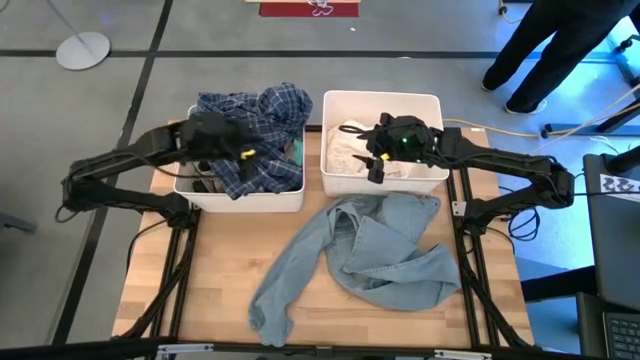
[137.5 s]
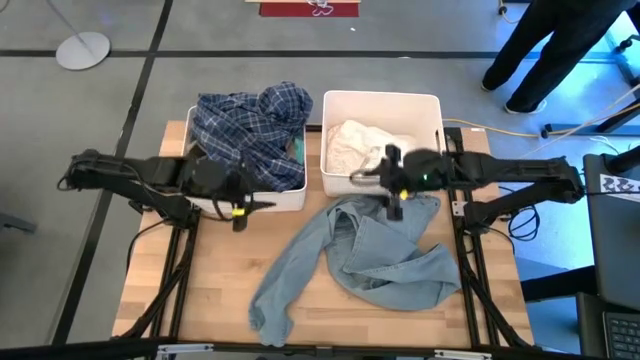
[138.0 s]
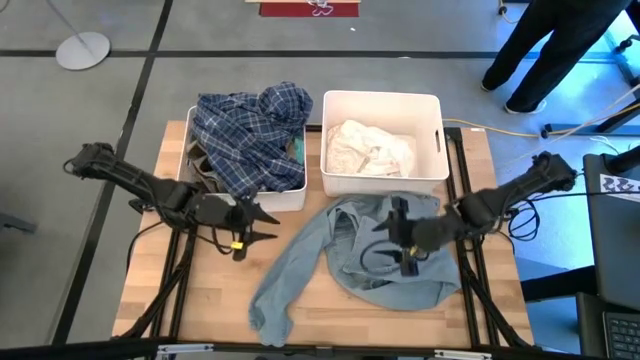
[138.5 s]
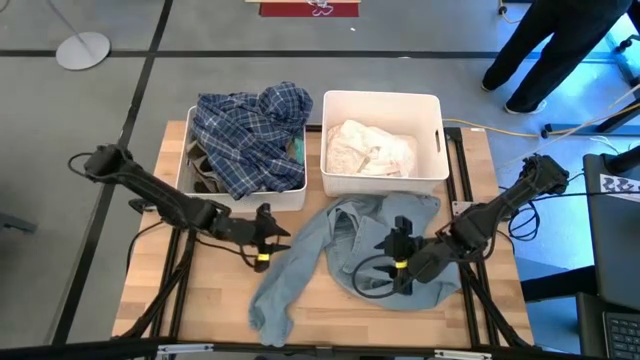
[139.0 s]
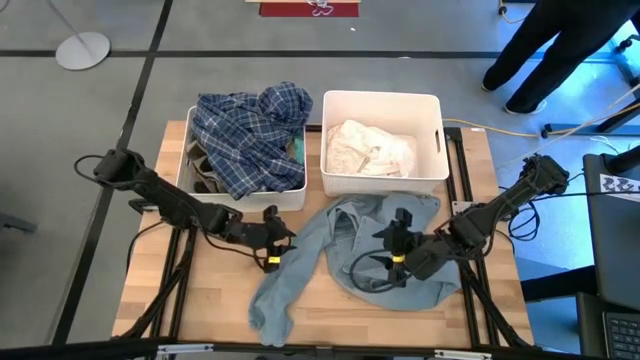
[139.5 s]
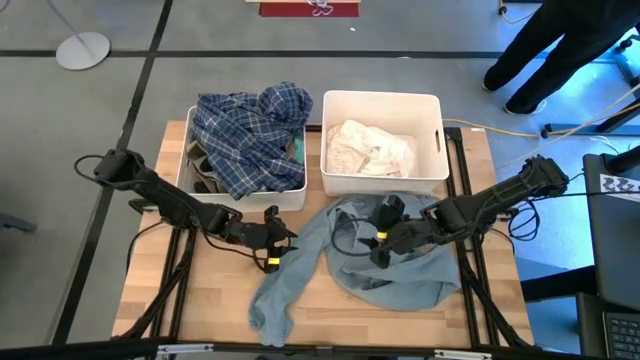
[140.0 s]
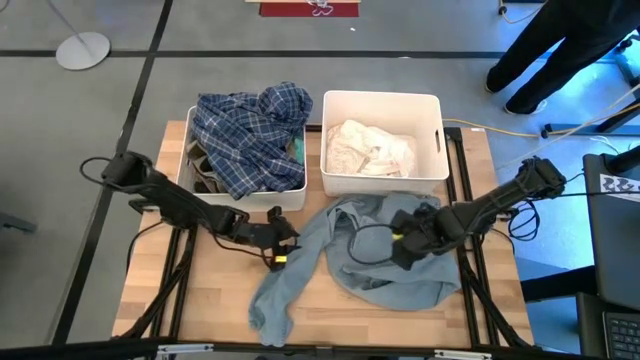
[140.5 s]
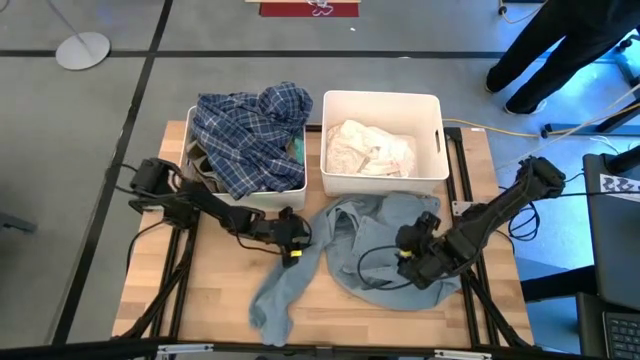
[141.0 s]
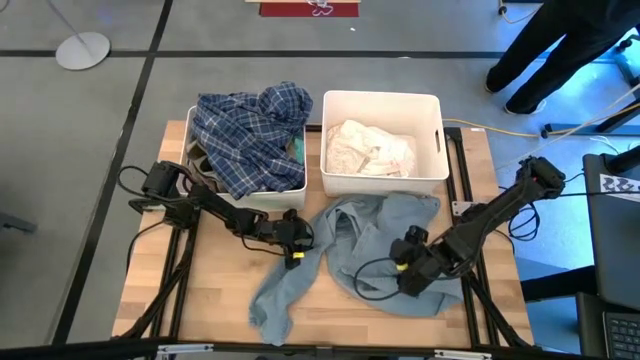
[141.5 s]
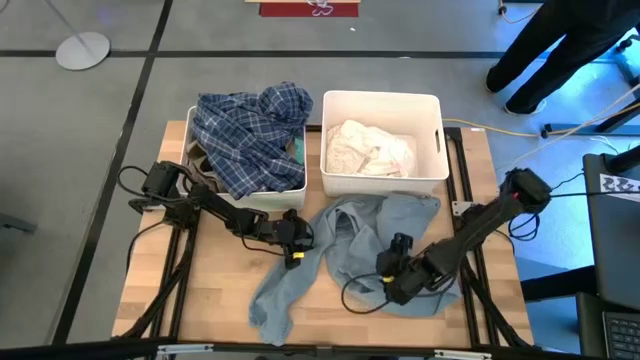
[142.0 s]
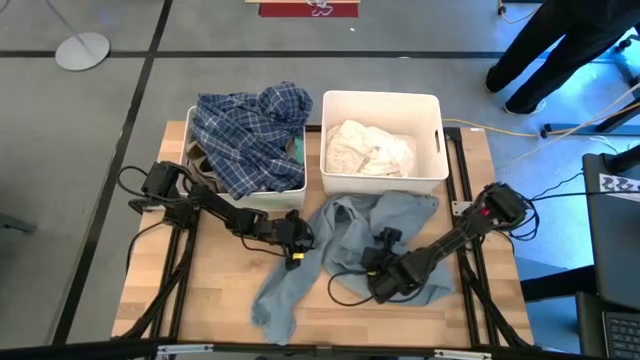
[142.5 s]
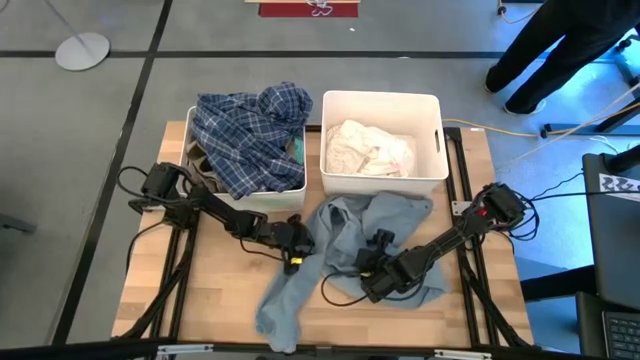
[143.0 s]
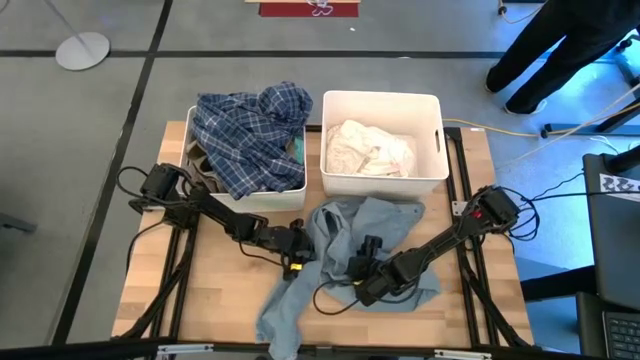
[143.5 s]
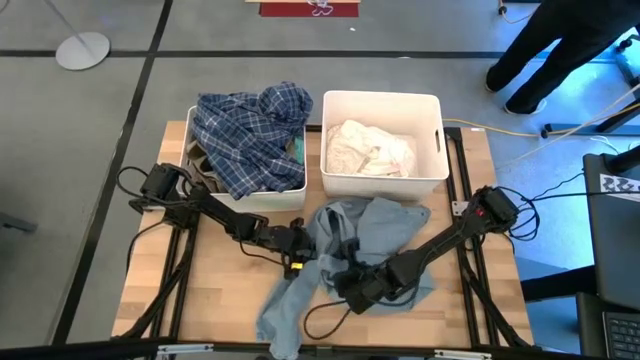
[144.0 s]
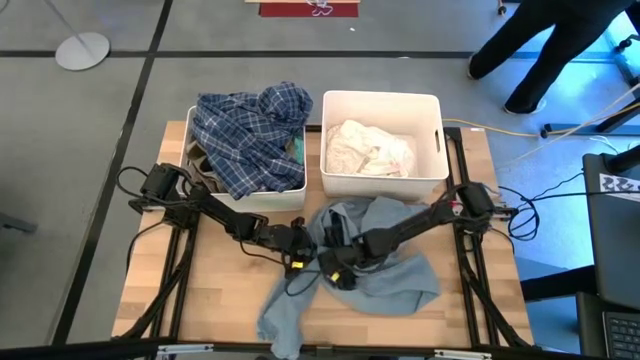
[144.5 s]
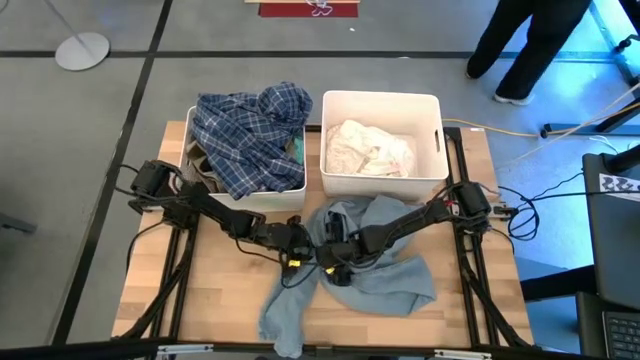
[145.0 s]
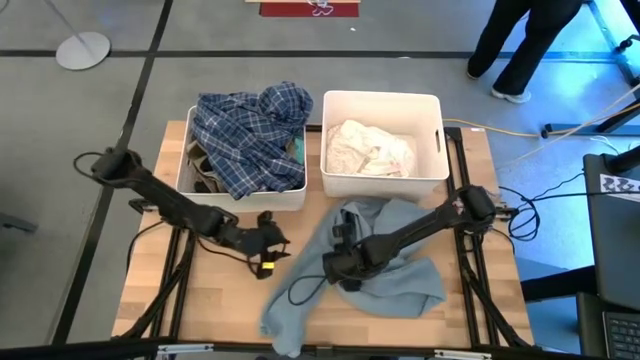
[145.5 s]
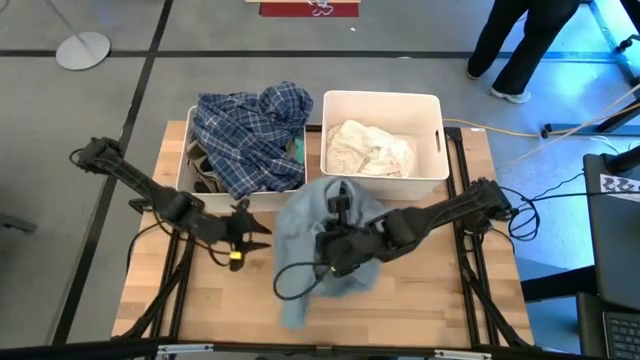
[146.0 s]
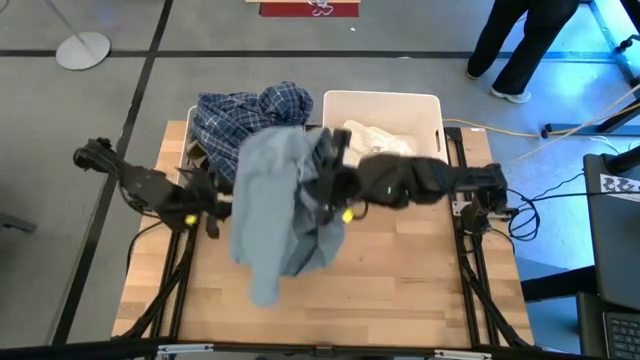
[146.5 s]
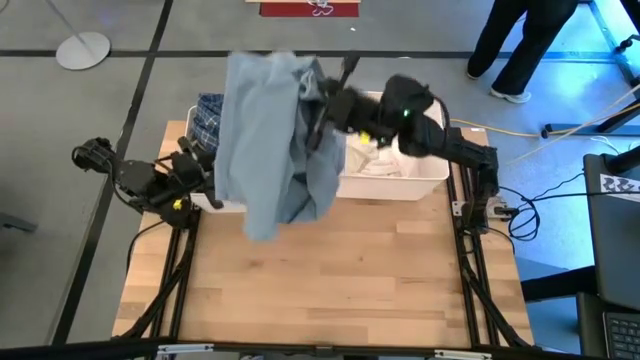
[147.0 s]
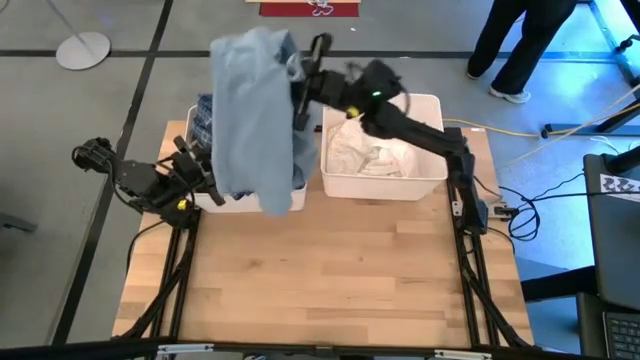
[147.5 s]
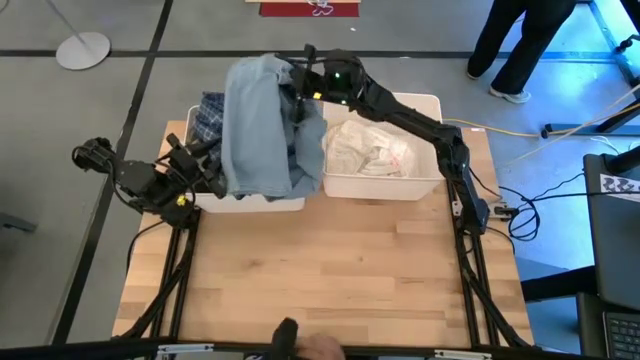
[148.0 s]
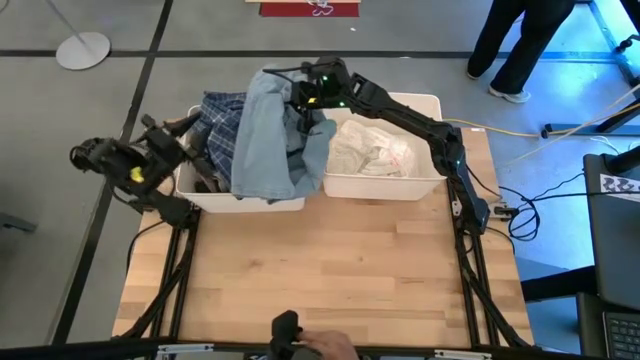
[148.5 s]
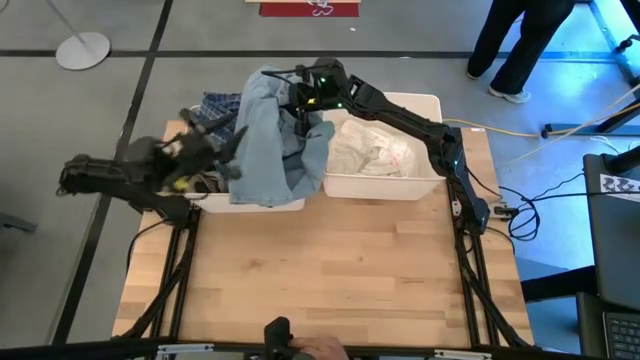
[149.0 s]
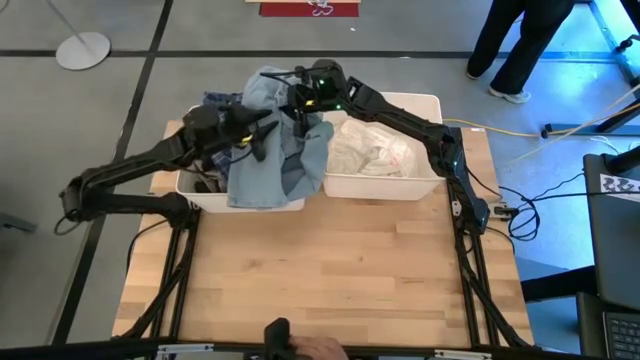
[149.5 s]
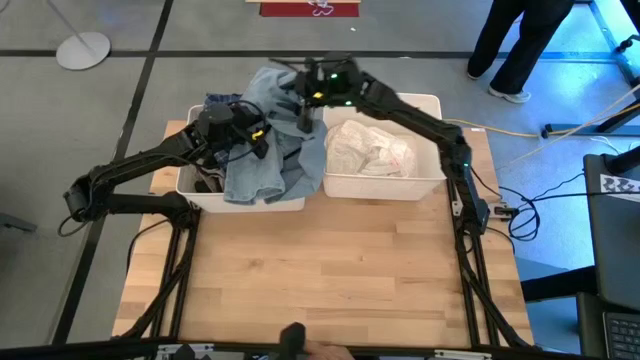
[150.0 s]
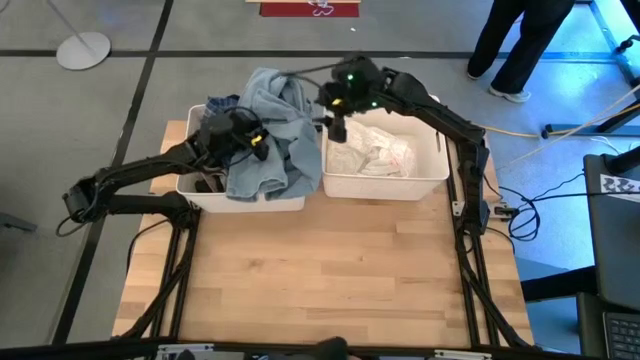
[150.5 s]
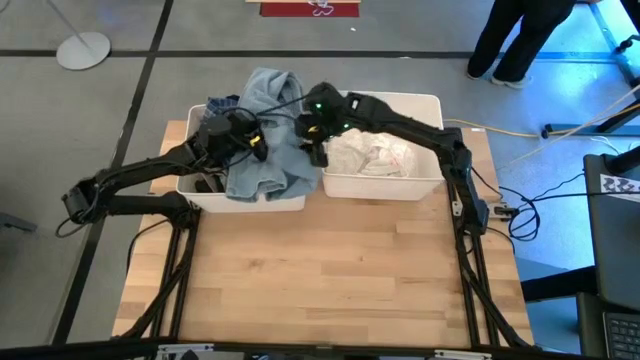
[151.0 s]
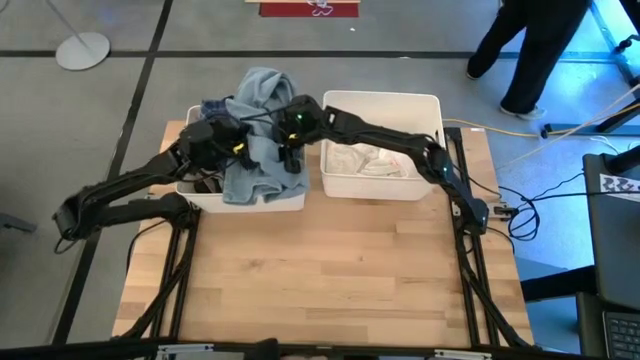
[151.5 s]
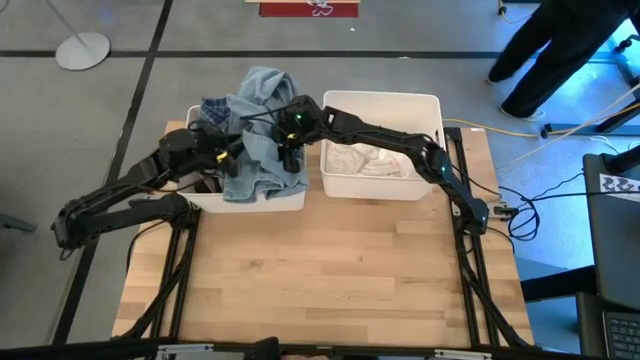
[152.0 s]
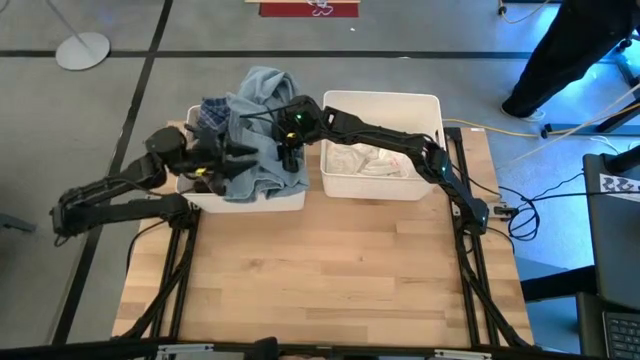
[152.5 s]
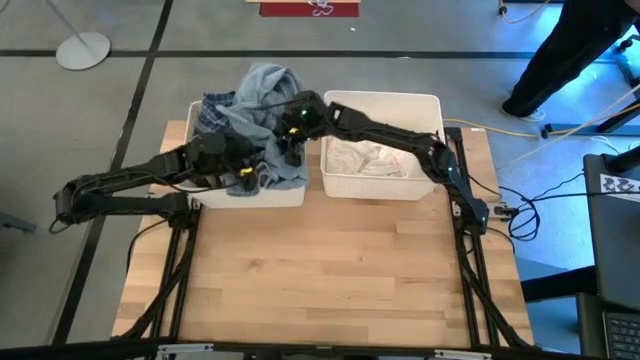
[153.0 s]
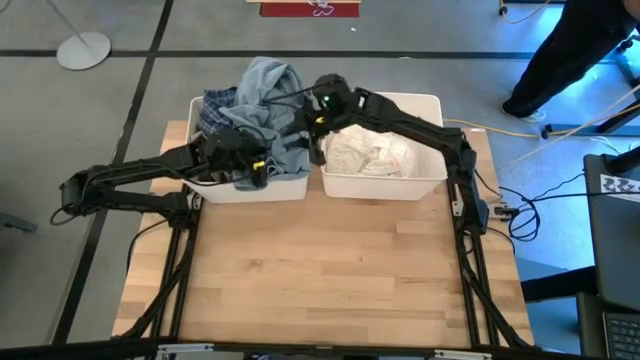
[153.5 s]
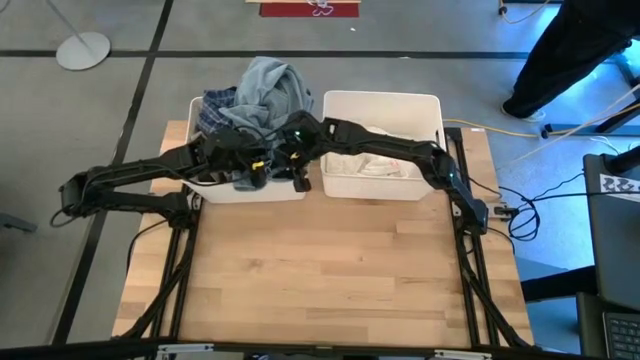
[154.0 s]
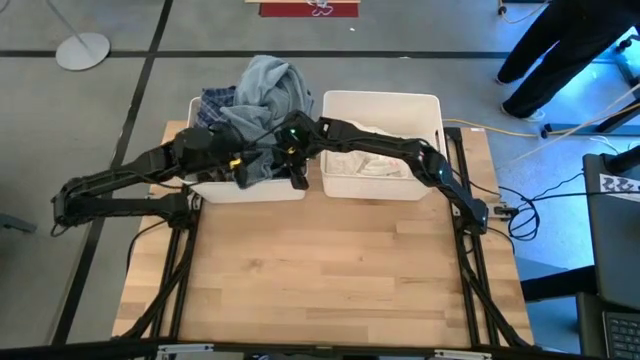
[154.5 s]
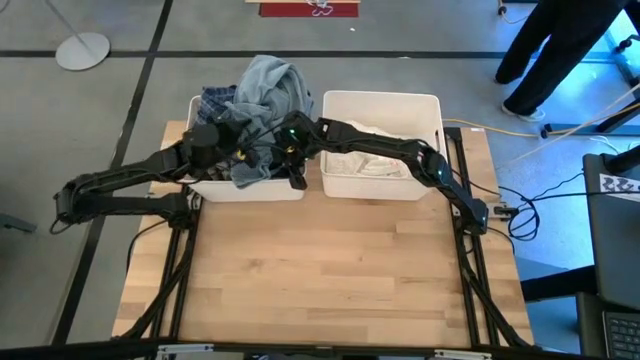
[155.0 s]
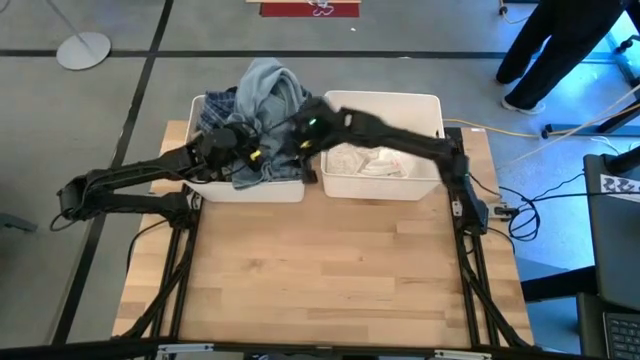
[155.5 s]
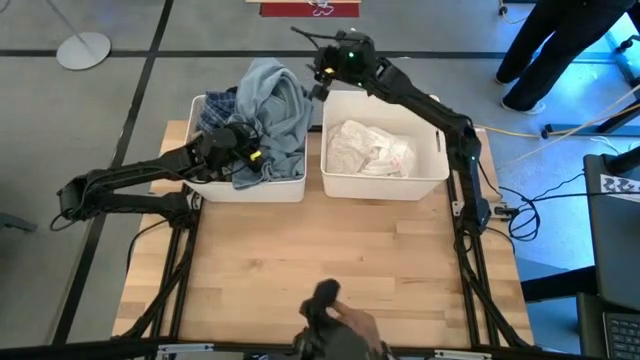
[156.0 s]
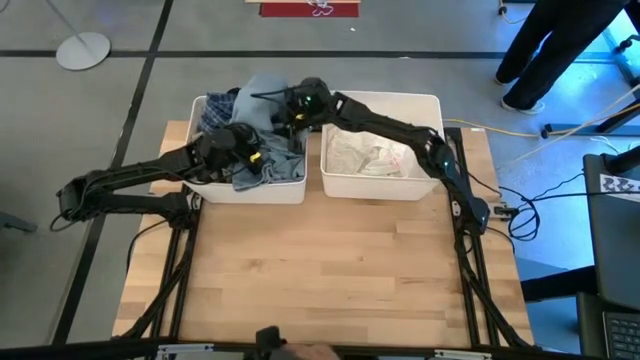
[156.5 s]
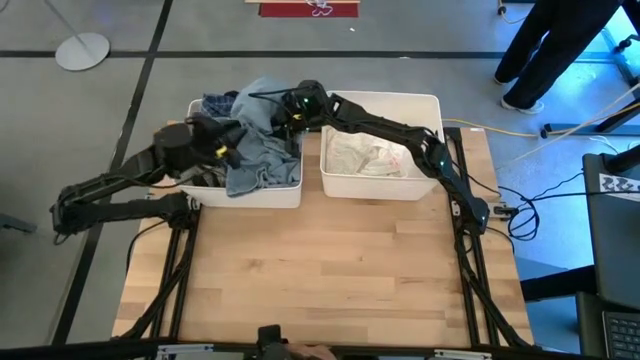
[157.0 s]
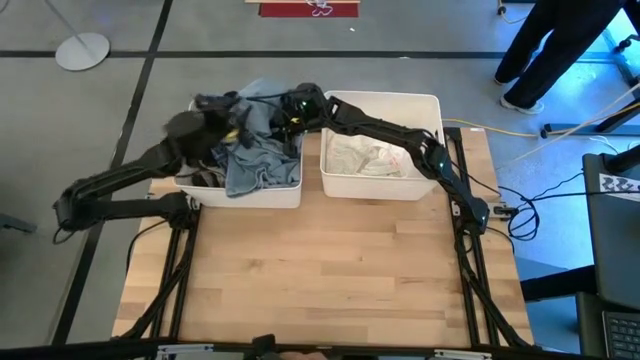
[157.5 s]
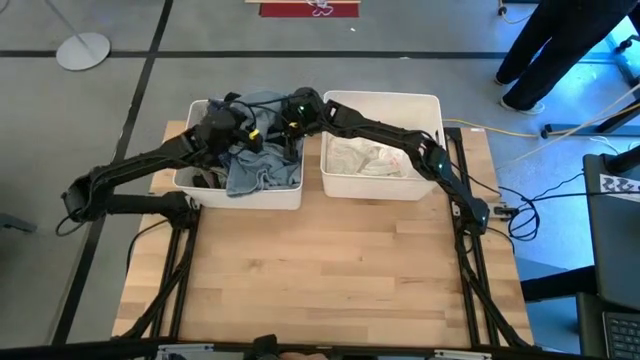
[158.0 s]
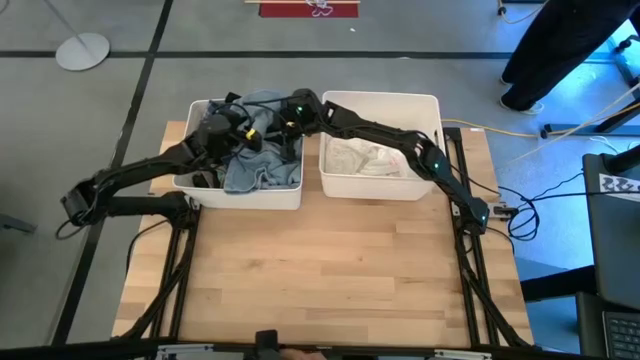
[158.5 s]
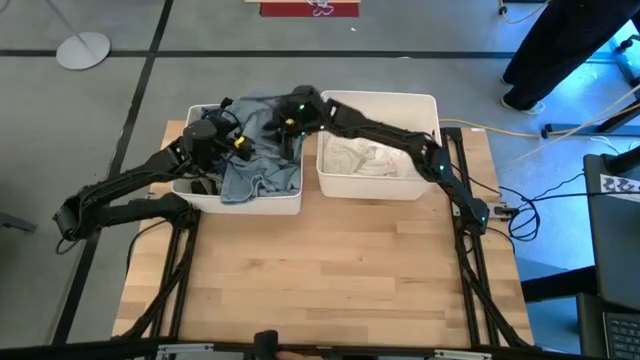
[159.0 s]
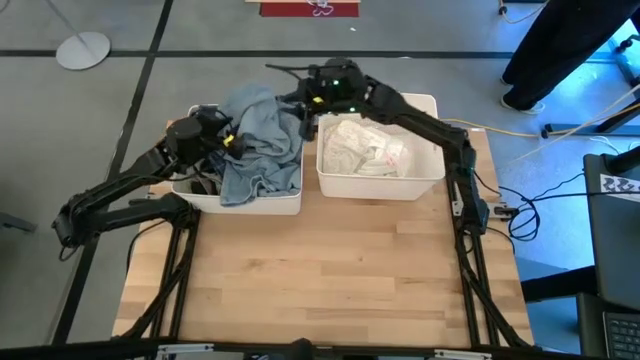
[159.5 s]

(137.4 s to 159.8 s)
Task: Sort clothes
Put the light blue pants into the left white bin
